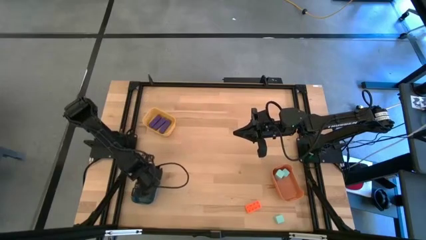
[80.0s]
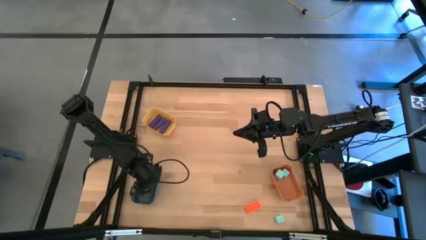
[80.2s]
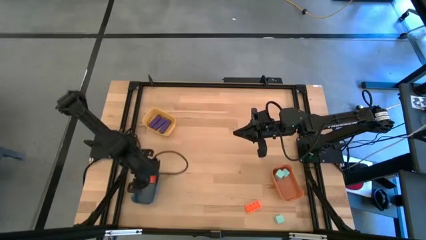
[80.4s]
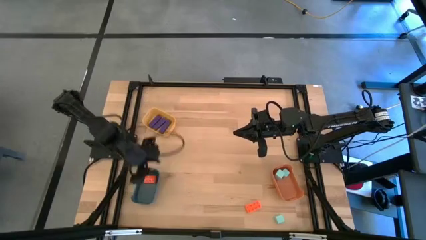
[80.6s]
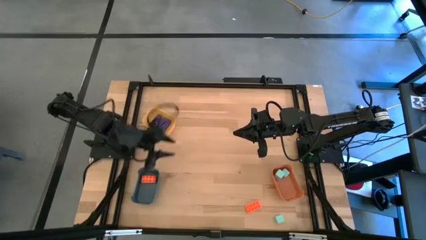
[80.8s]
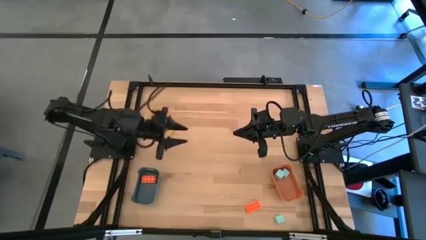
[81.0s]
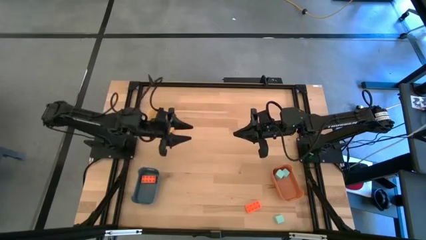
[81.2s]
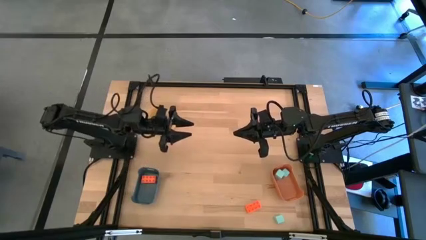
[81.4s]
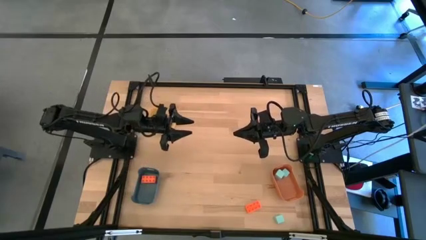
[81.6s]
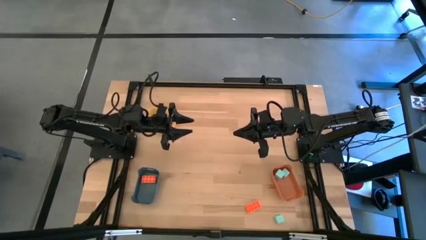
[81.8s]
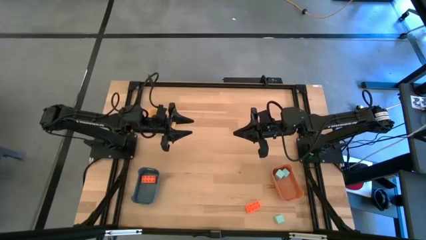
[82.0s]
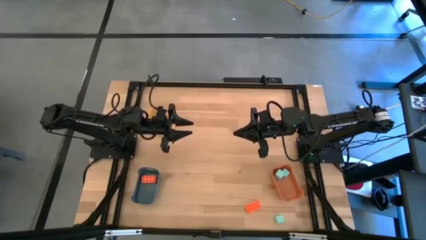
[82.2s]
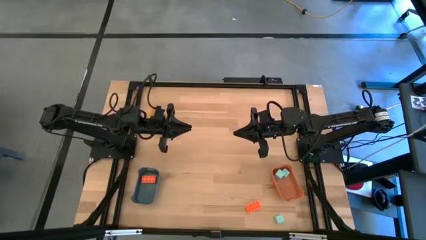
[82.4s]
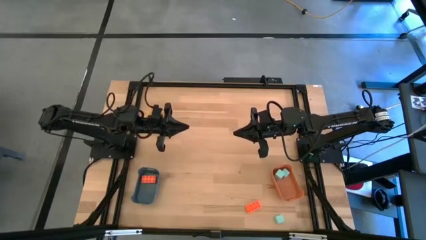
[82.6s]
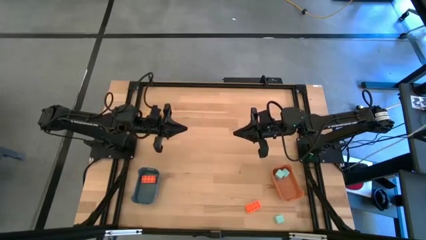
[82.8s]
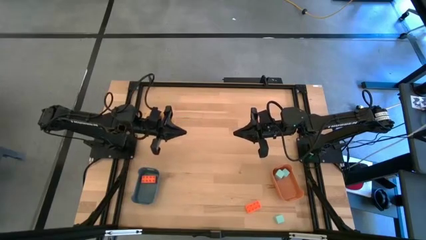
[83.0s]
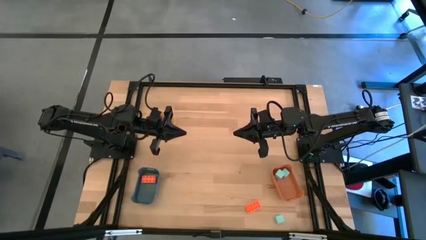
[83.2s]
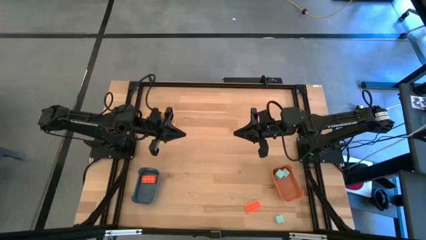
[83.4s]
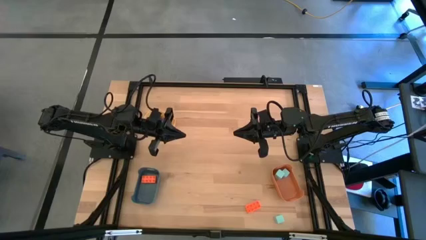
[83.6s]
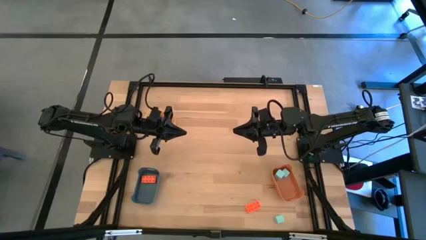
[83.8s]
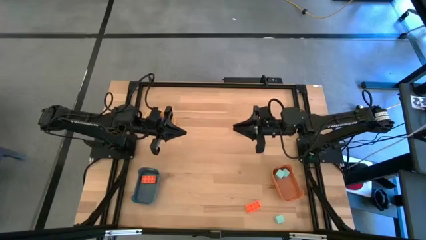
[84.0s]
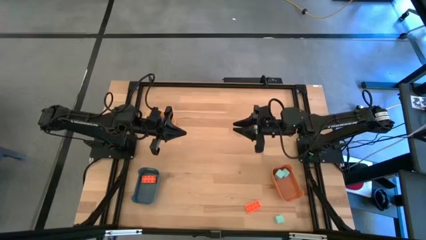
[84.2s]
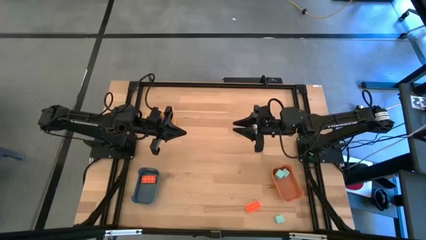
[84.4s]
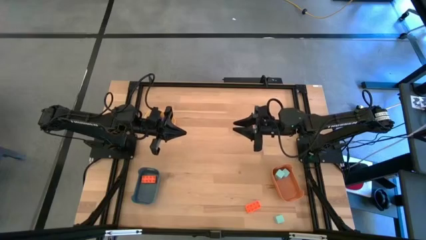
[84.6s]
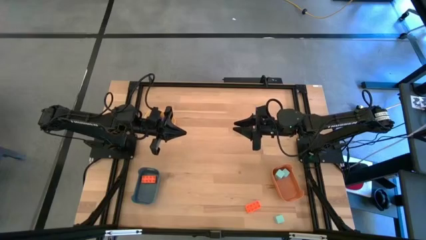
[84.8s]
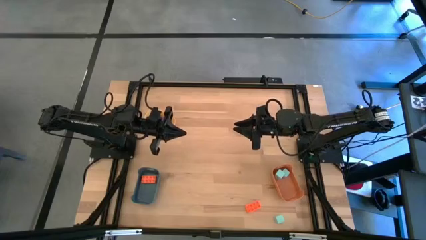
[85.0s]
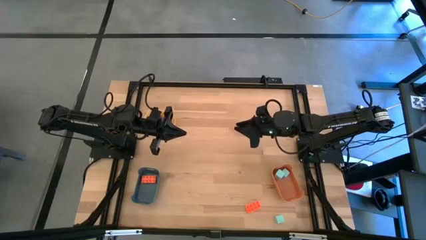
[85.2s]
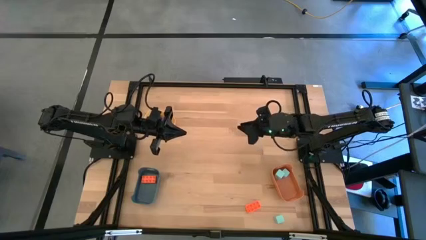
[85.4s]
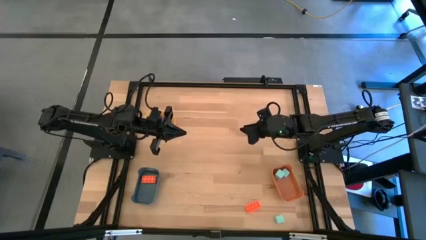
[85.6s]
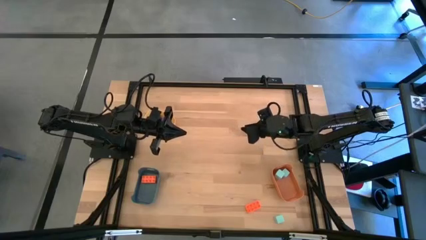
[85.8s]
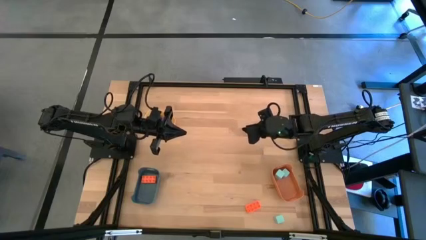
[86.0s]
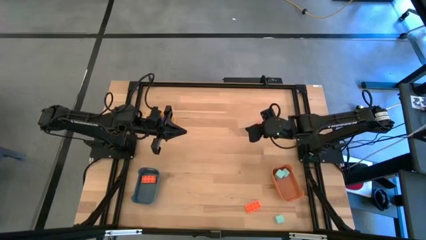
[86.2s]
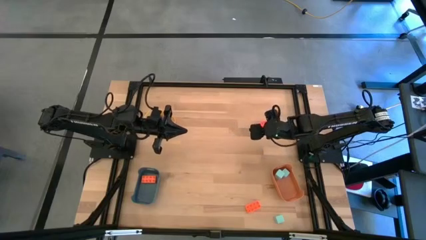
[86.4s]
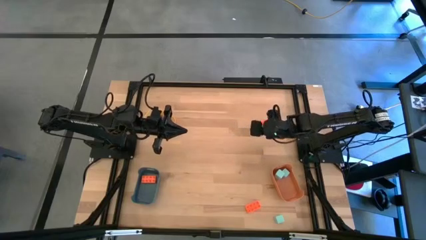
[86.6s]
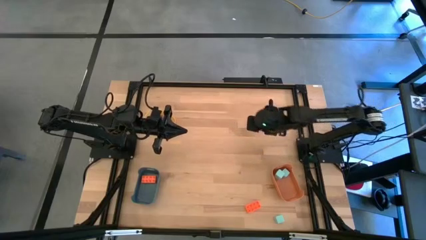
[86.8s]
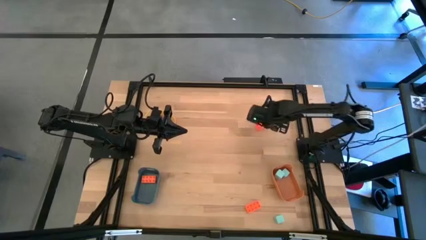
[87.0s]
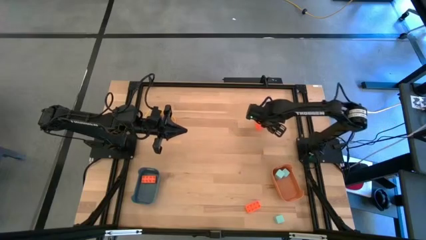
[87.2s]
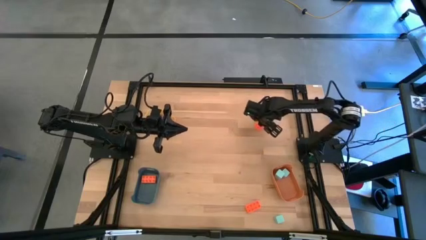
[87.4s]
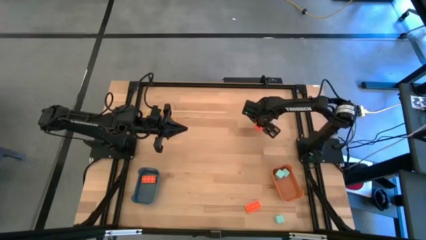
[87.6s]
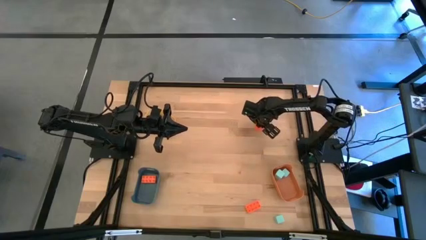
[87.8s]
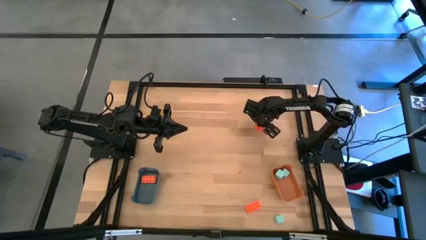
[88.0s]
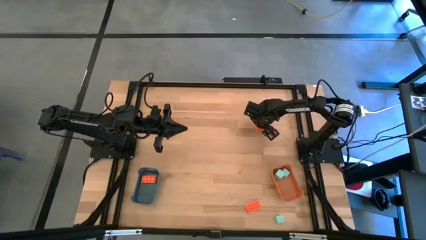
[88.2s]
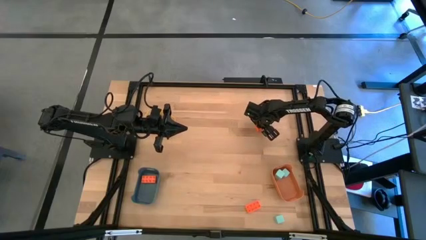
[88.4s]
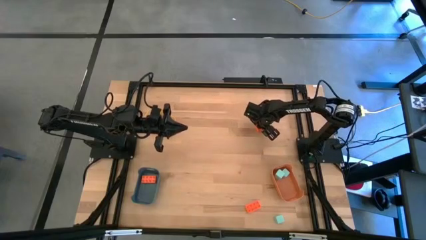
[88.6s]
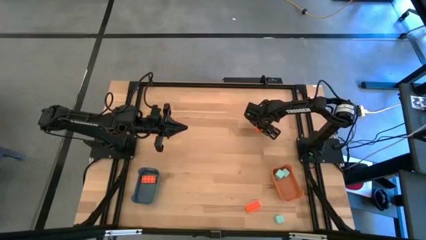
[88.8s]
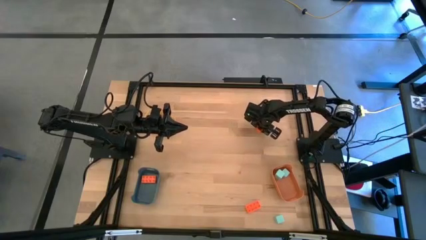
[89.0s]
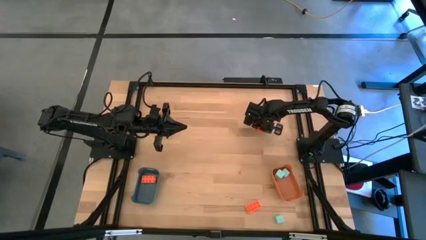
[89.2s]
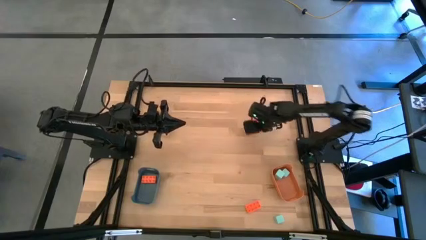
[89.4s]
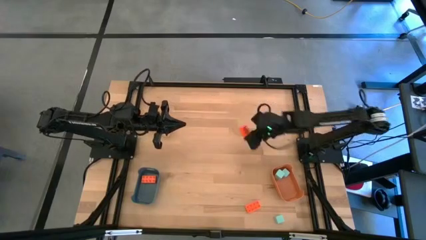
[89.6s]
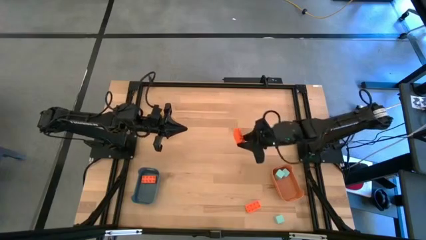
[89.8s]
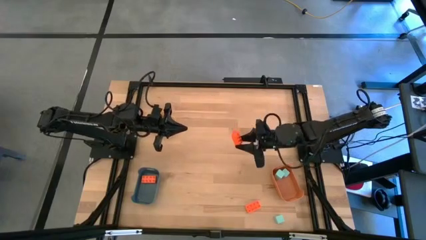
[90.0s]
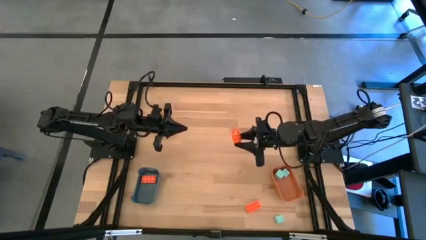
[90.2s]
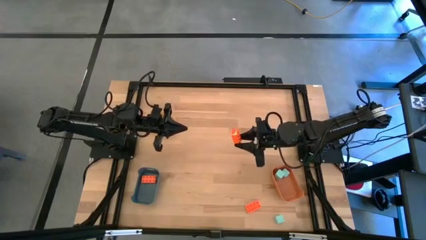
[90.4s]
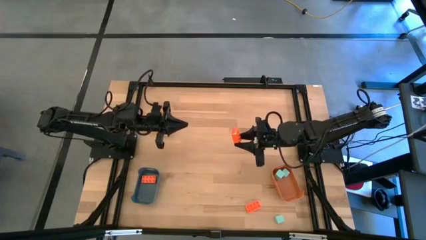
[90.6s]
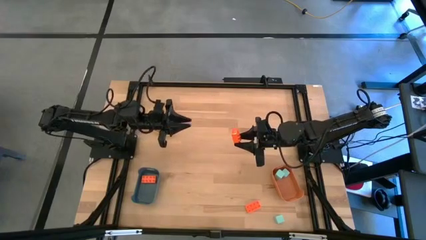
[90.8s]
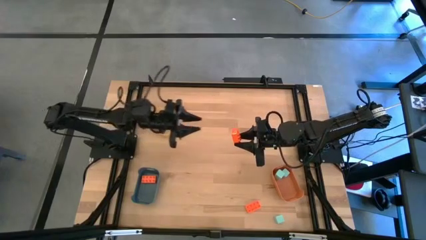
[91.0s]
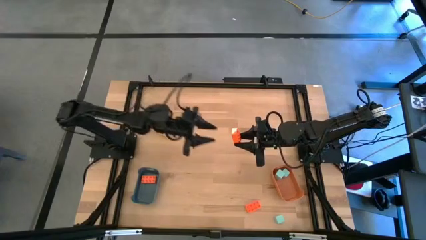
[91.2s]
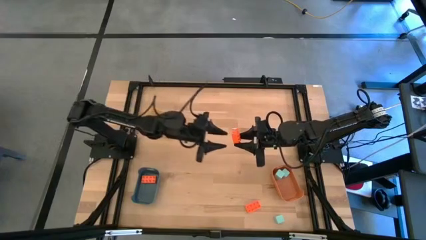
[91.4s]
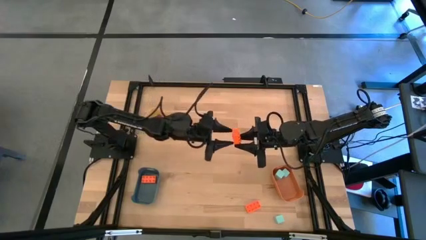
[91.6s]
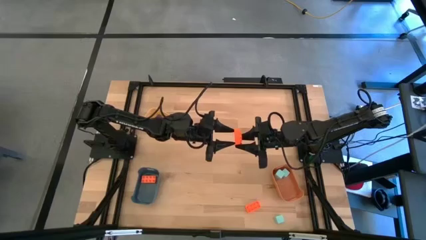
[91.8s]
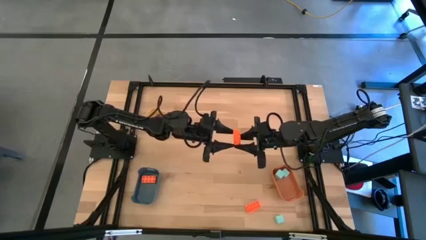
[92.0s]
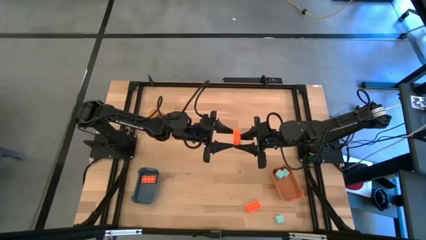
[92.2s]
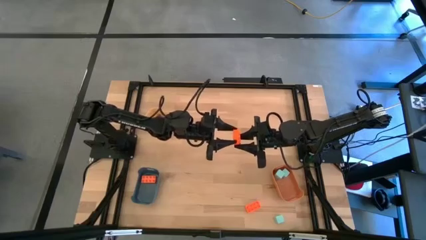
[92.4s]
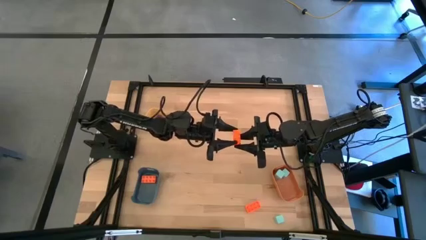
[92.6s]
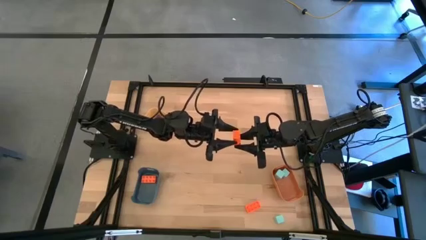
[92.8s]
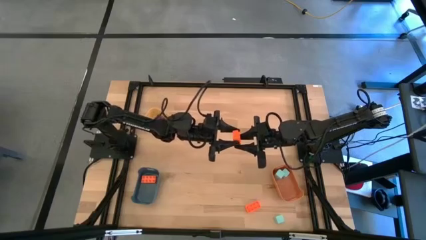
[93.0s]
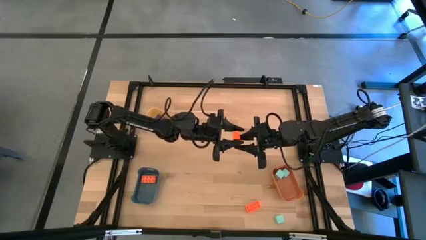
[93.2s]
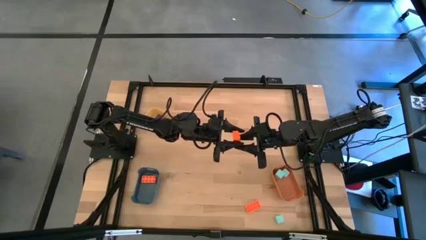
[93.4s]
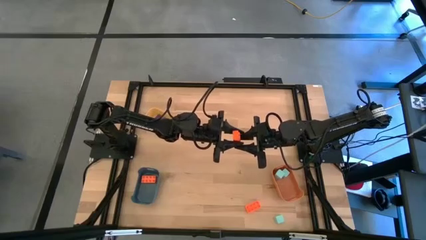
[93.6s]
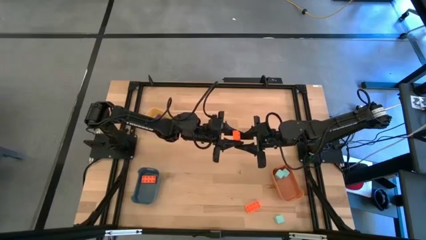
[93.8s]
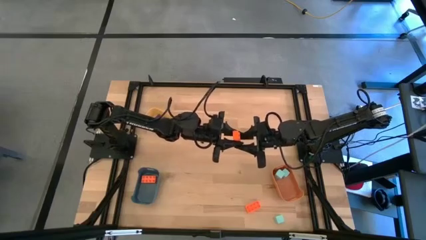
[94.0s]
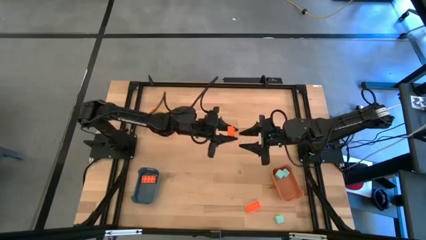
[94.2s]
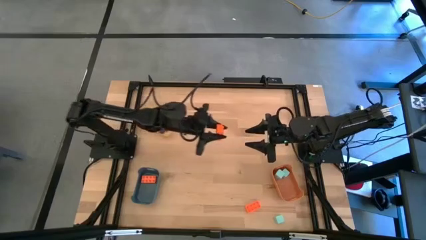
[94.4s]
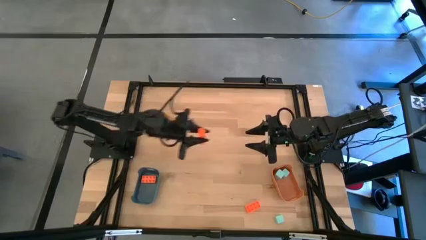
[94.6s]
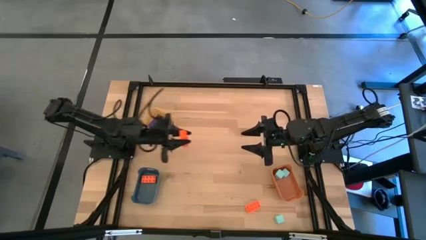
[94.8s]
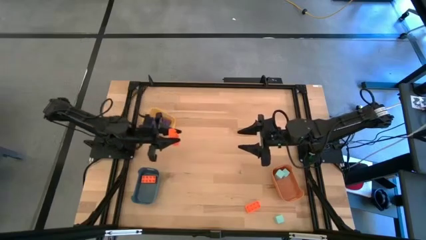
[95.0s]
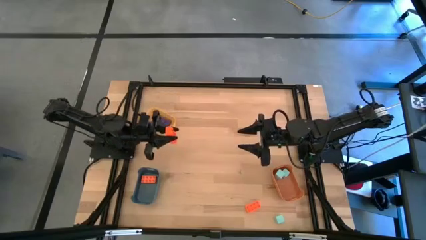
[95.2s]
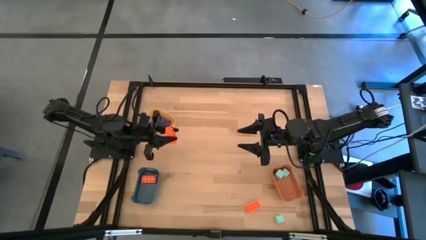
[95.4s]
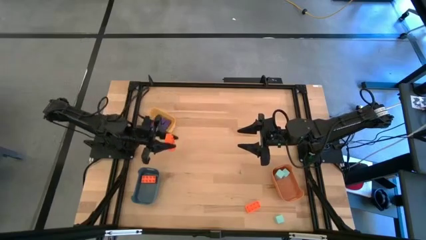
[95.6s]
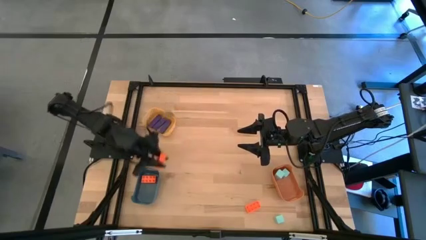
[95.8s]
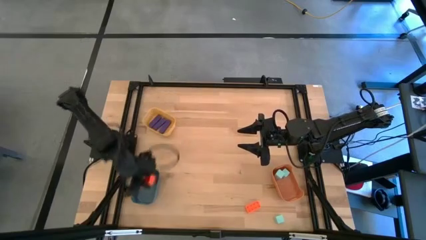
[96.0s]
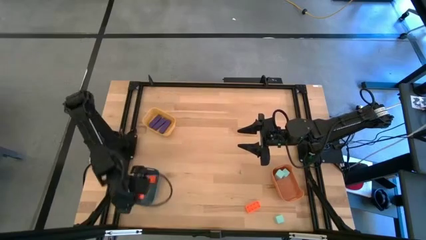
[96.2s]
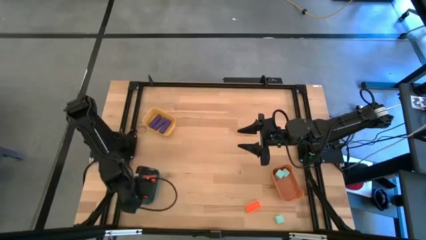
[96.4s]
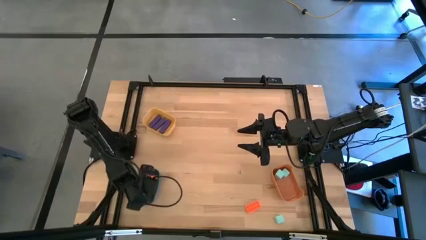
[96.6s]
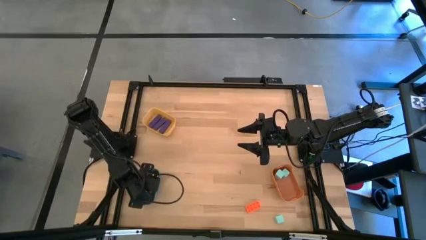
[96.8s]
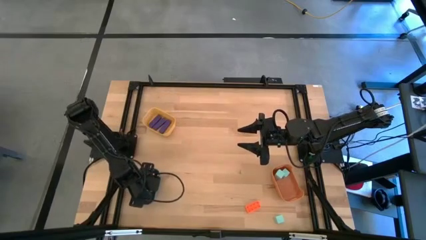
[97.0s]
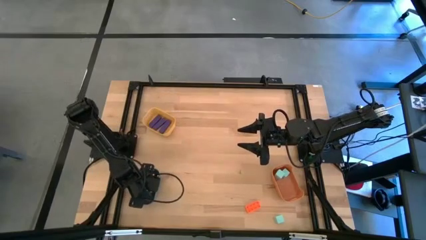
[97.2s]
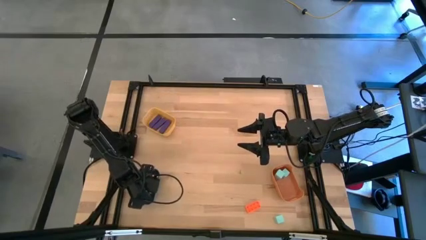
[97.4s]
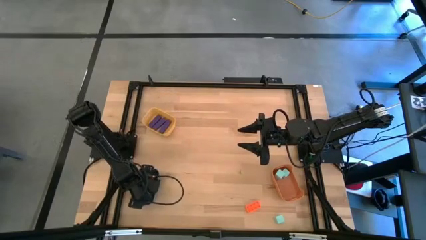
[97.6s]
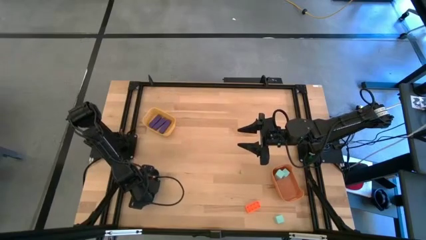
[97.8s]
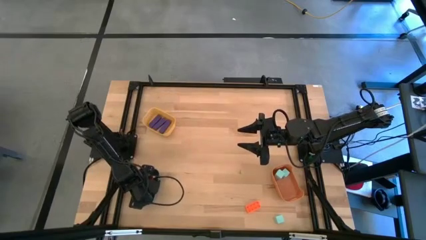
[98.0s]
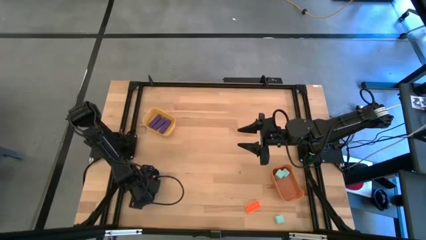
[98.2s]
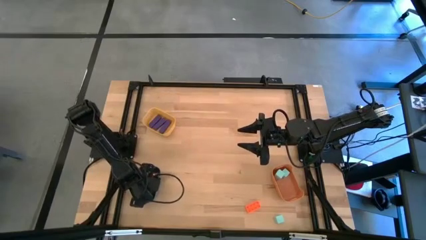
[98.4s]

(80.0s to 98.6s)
Task: Sort & place blocks by color
Put the top orange game piece into the green bin
